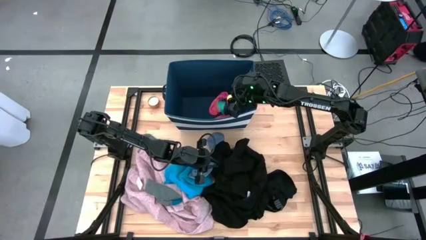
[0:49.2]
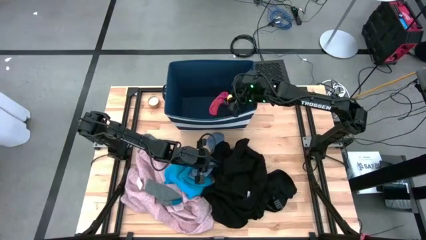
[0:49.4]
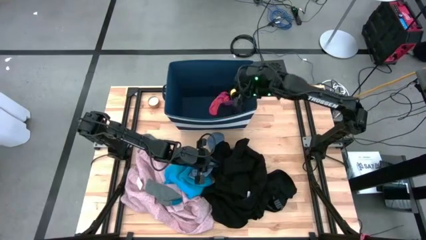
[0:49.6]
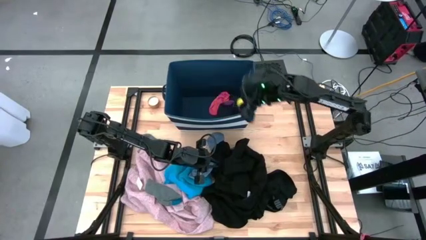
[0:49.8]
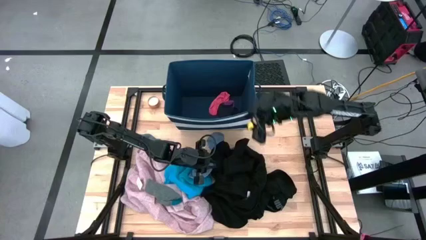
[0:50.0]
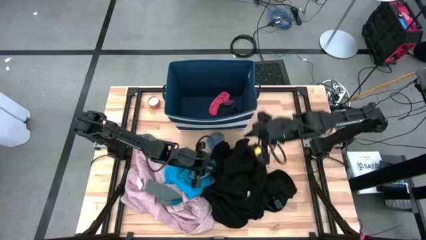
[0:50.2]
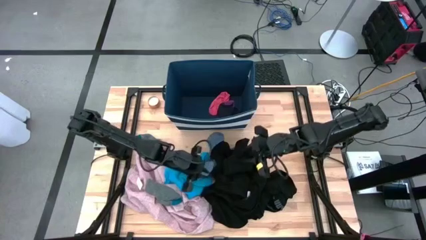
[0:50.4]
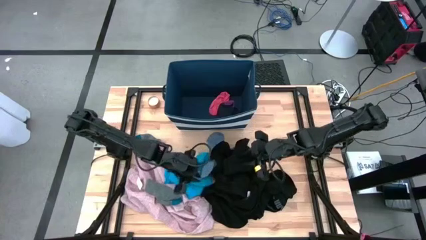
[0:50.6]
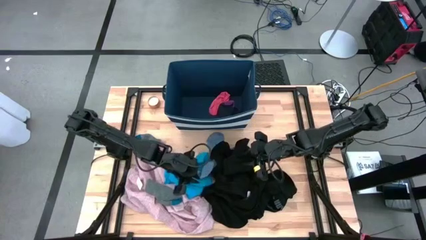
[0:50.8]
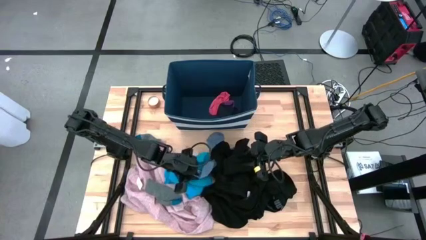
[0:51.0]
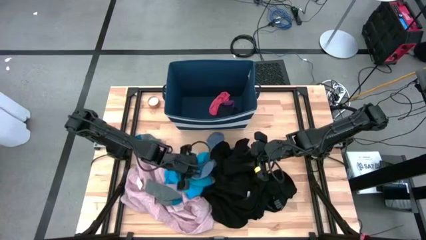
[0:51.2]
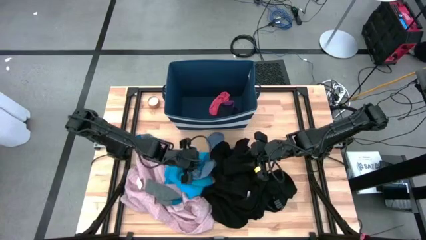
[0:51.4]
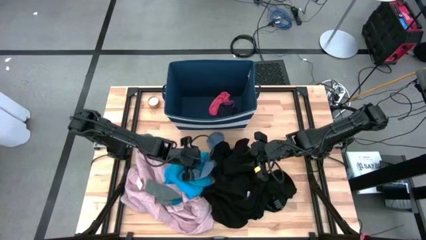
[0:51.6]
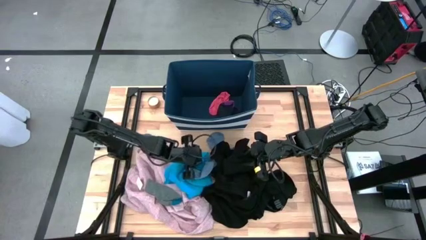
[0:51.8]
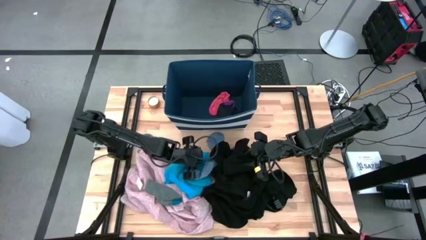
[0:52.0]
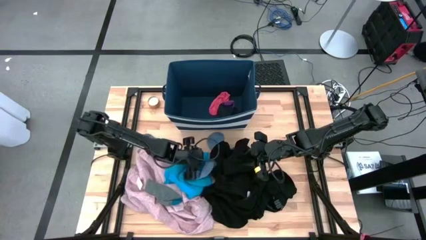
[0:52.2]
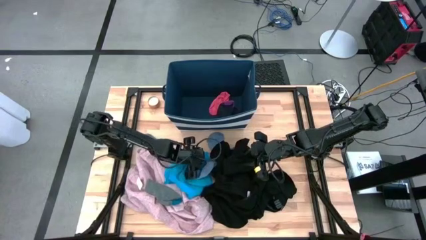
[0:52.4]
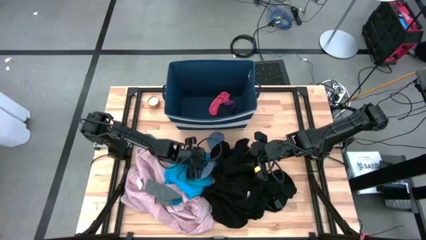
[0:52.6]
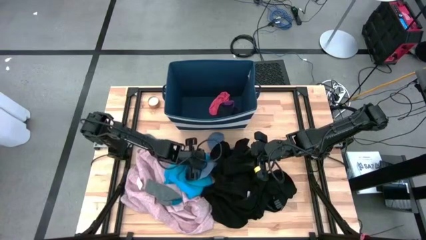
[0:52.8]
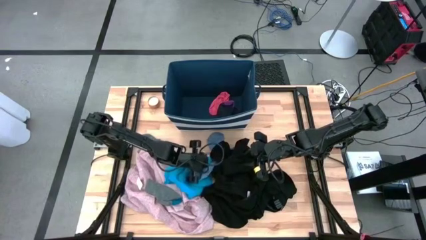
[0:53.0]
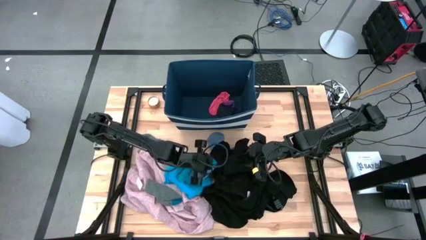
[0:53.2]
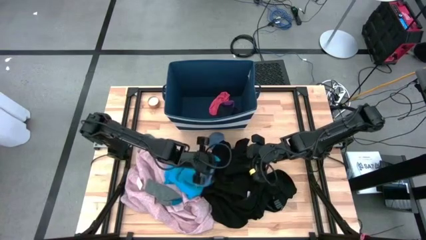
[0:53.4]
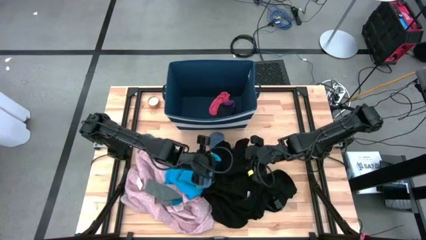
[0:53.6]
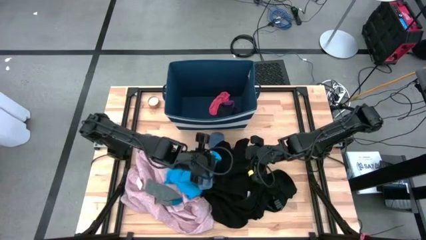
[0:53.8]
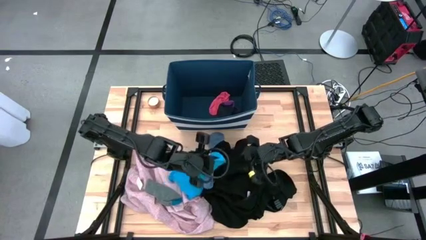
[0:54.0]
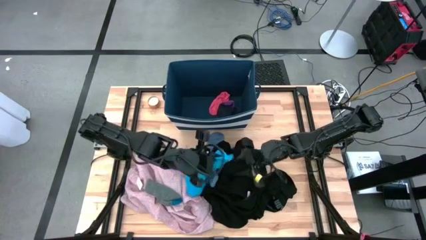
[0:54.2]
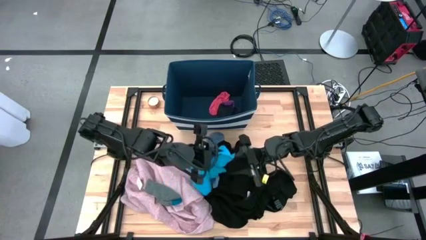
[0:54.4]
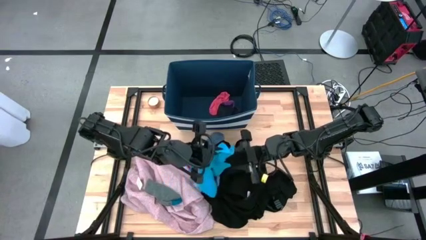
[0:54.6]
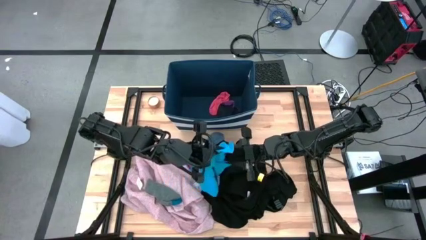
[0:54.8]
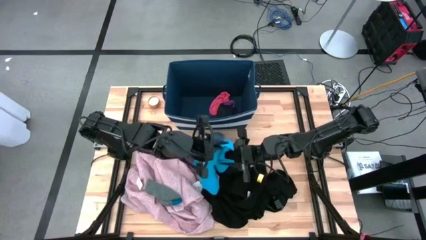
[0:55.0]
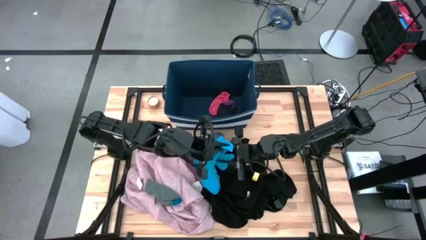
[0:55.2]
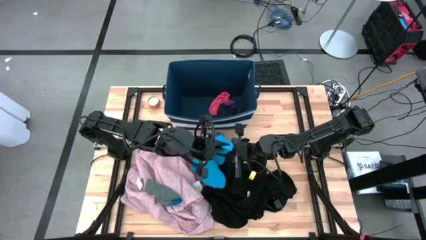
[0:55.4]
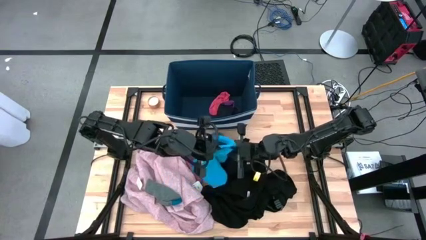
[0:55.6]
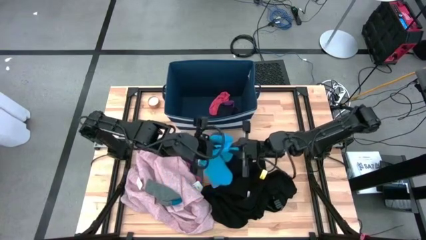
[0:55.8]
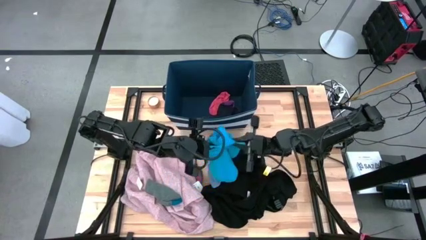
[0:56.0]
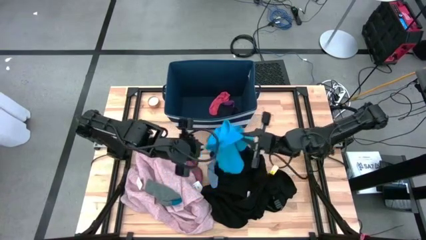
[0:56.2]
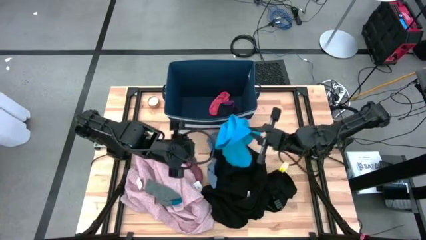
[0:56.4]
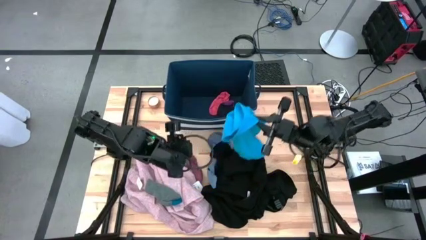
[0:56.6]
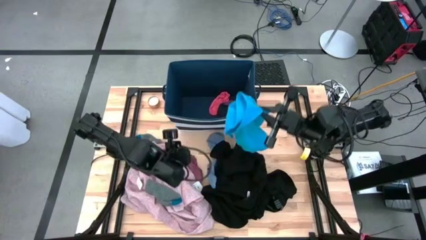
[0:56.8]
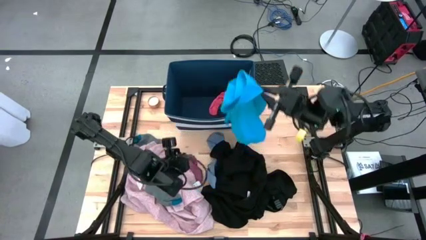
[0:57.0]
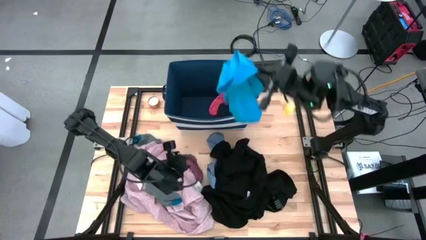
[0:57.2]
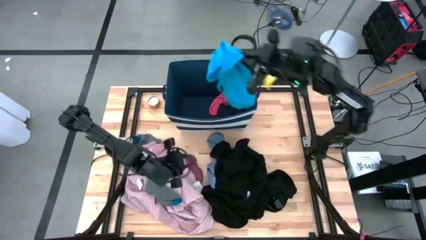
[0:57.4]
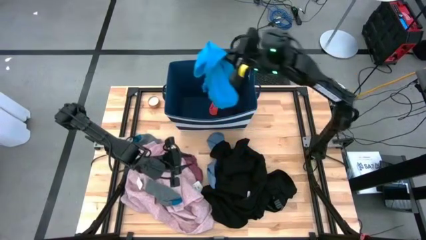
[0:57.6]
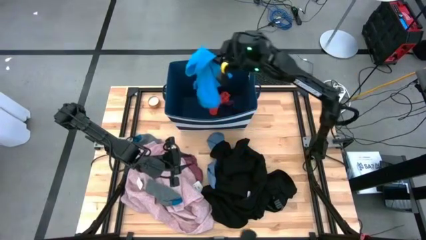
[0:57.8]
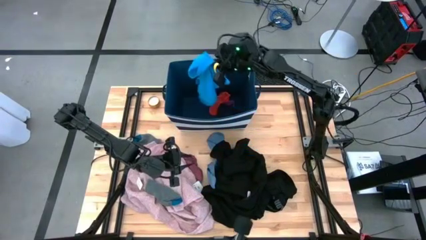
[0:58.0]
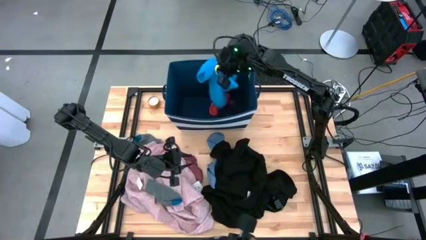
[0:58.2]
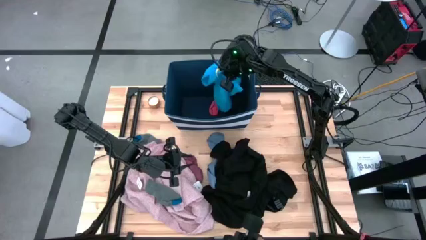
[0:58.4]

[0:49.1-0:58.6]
Task: Sort clothes
Put the blue shorts into the blue laundry bin

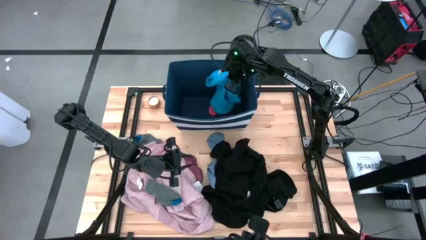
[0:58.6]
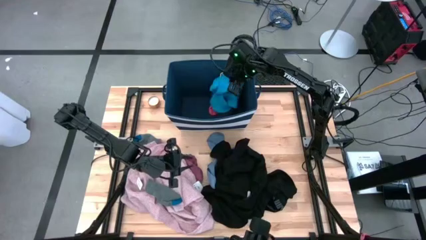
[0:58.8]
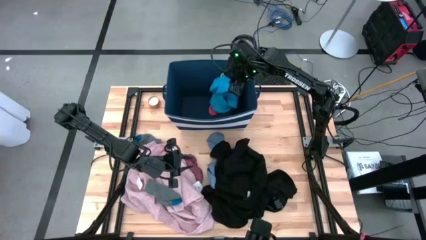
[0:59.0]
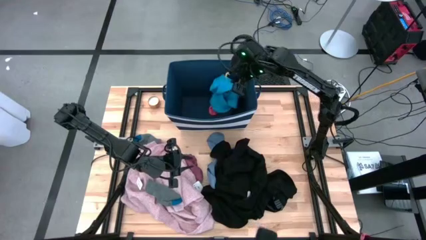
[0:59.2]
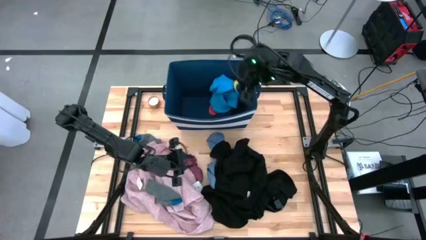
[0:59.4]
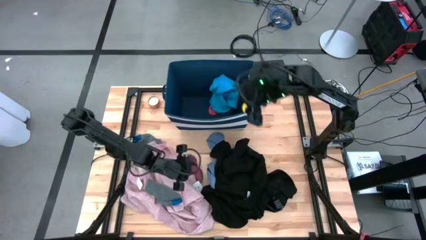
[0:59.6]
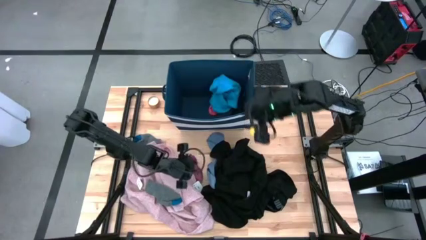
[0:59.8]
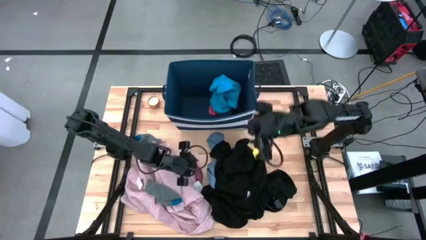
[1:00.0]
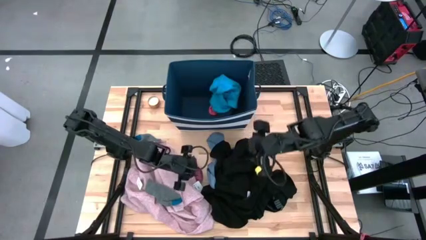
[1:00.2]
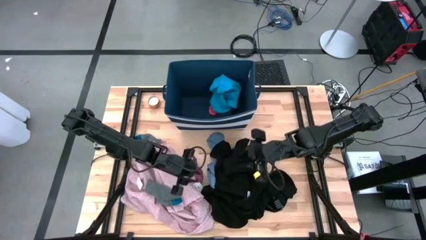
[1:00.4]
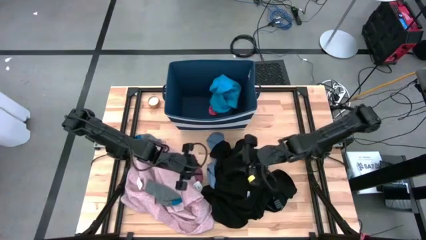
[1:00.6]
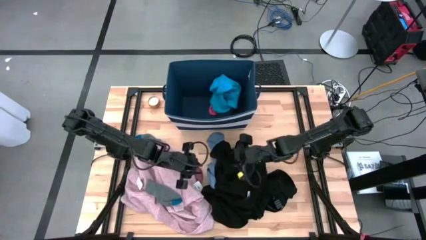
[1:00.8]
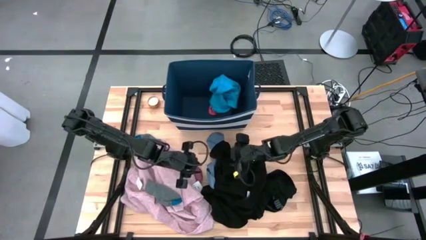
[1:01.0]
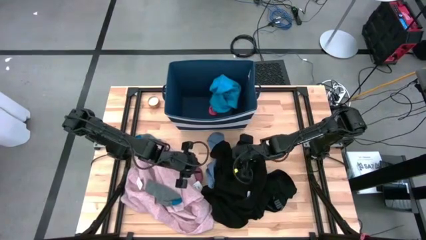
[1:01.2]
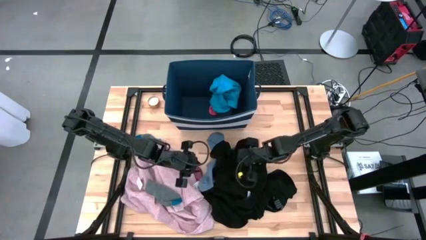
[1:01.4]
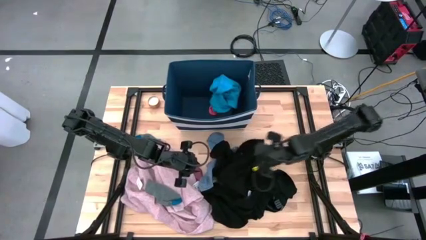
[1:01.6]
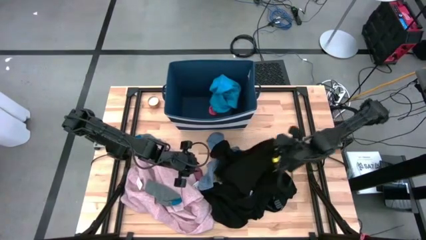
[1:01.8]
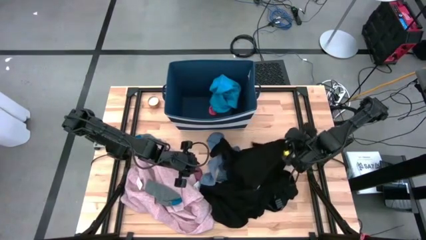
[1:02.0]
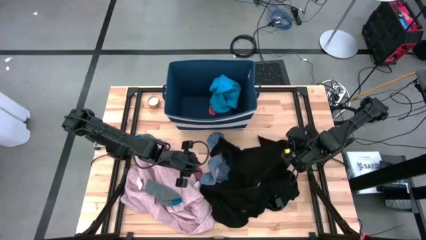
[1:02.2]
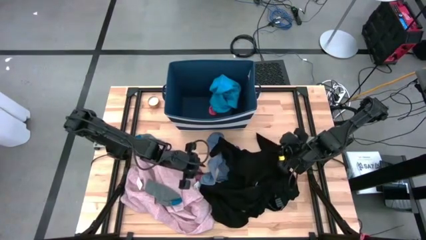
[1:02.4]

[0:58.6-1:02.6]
Move the black shirt to the middle right on the table

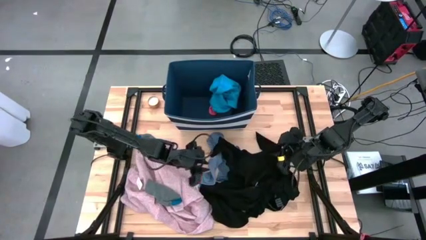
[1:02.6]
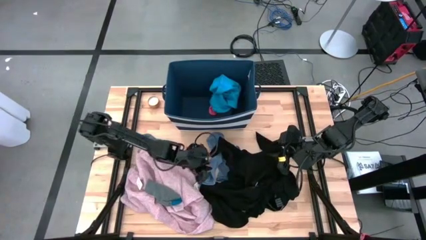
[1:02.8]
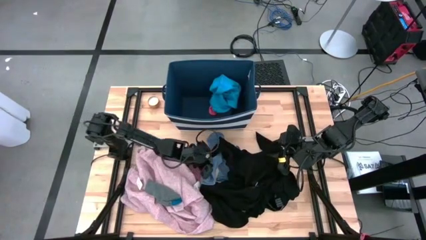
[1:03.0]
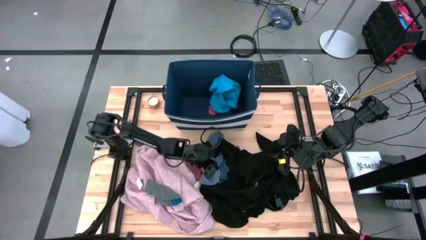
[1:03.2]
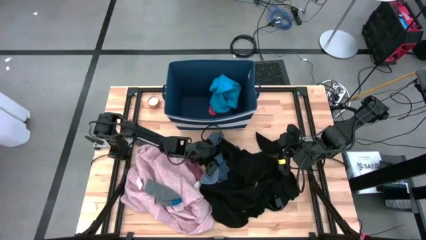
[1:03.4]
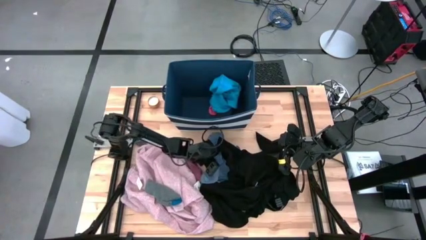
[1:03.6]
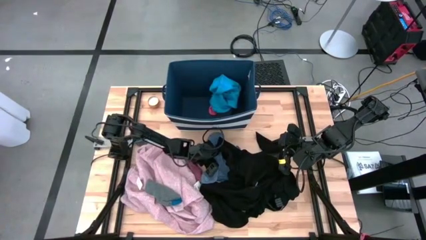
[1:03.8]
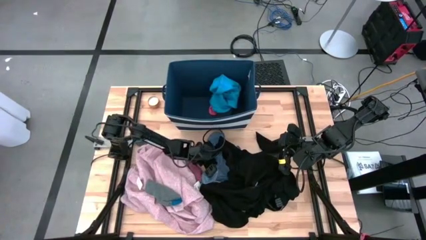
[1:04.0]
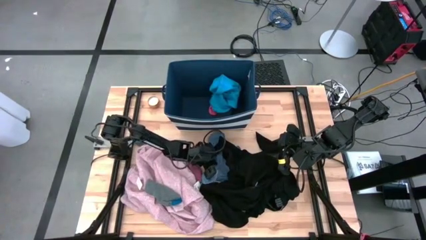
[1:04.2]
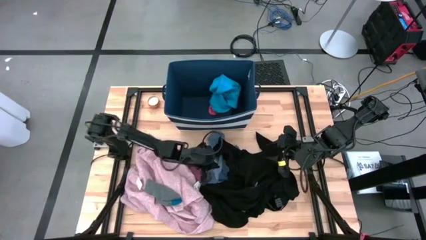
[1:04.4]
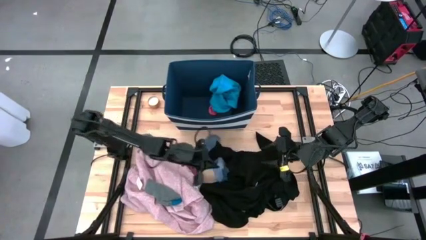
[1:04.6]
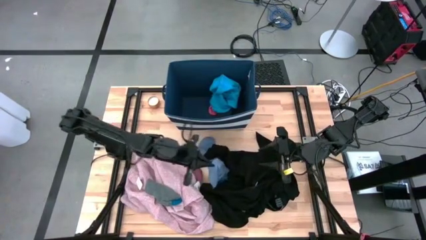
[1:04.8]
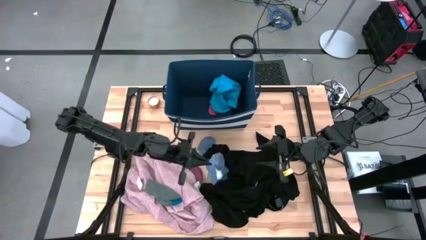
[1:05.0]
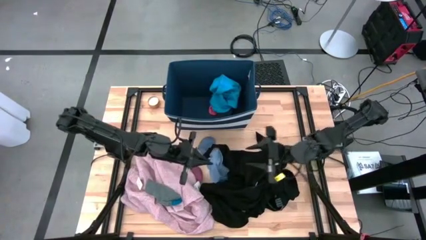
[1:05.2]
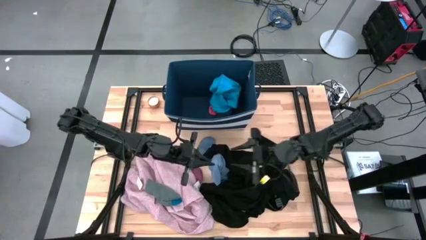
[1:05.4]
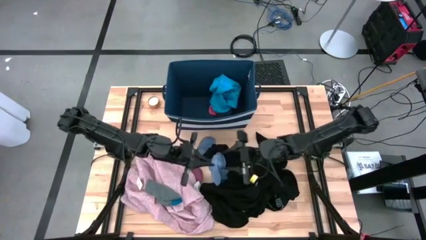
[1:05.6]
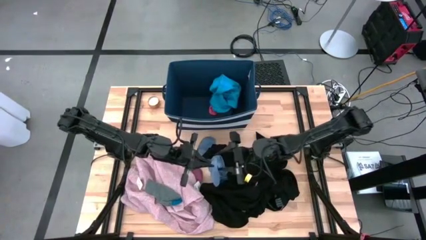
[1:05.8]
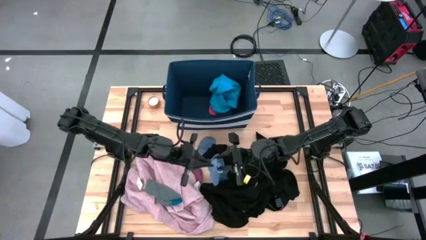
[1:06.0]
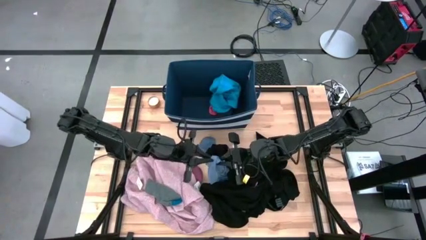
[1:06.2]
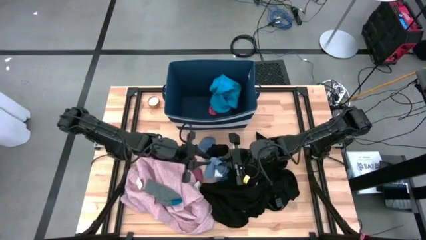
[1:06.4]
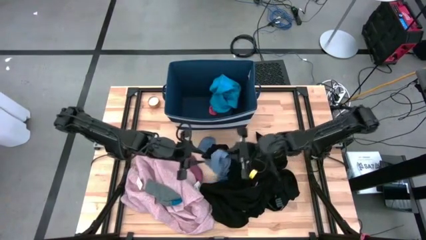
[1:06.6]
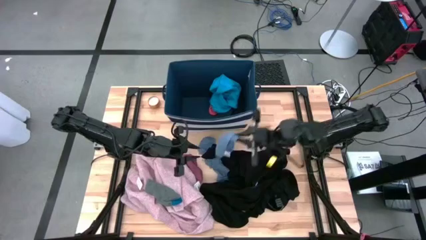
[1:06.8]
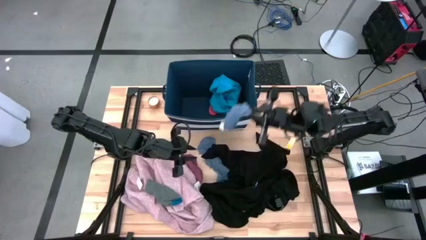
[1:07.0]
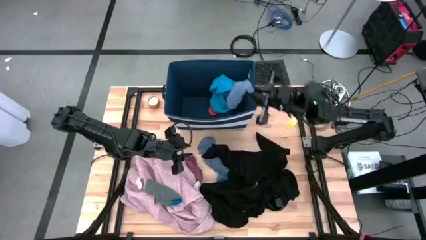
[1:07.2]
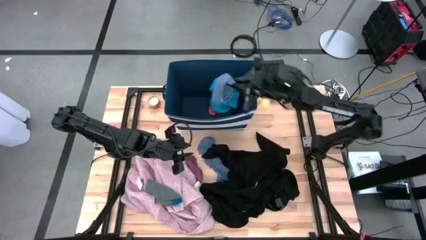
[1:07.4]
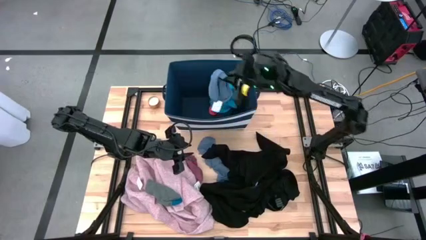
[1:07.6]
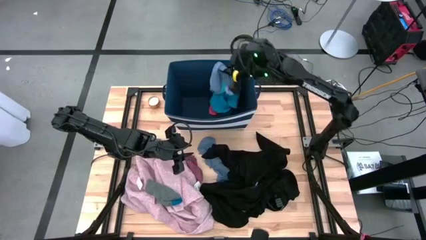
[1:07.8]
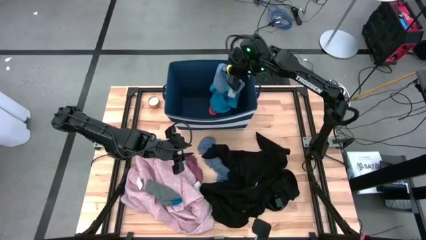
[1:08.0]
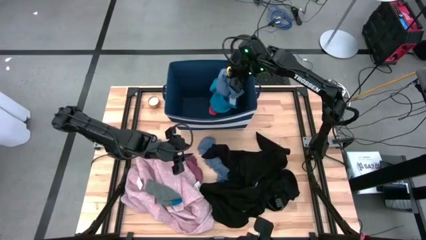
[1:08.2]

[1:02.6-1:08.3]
Put the light blue sock into the blue laundry bin
